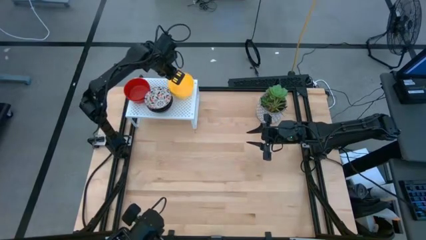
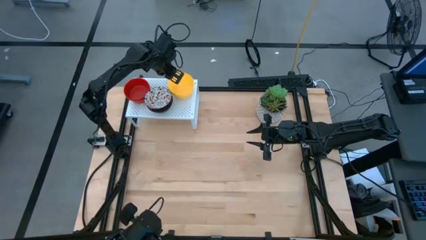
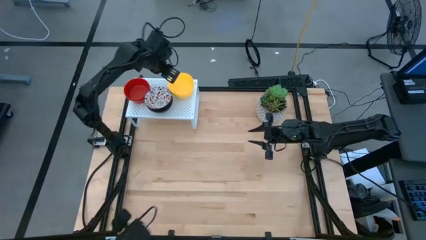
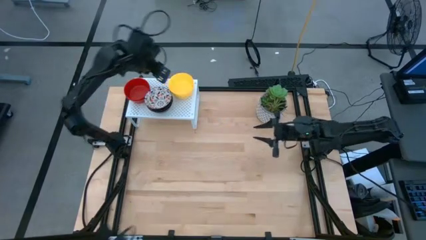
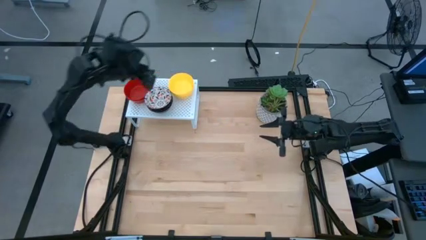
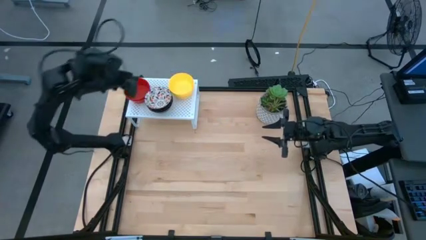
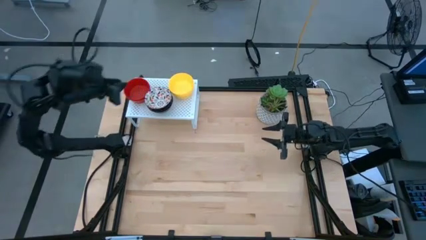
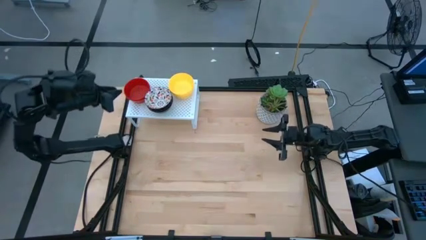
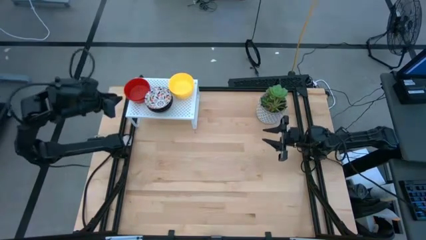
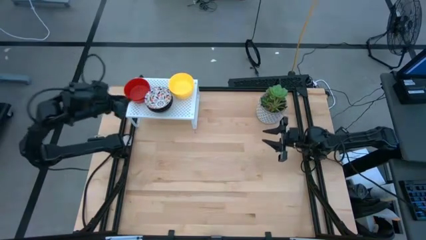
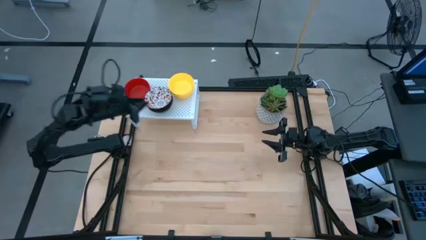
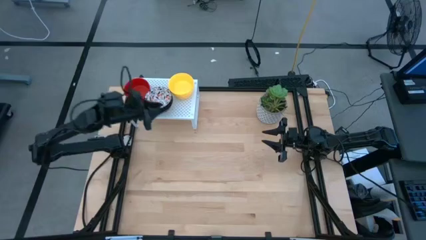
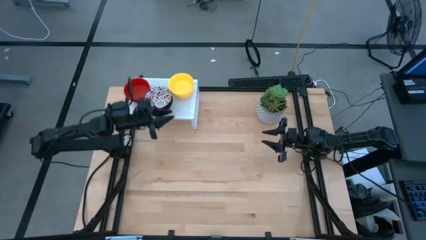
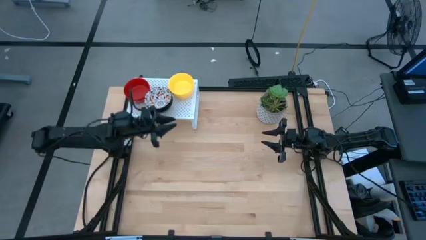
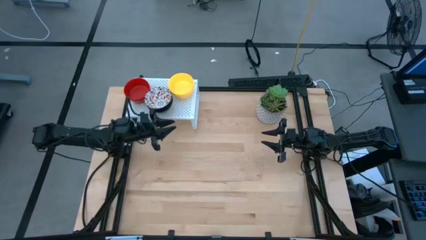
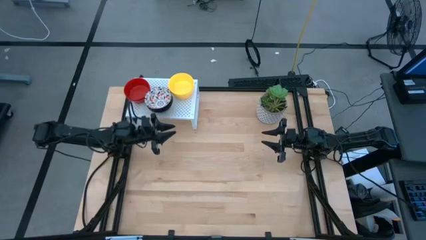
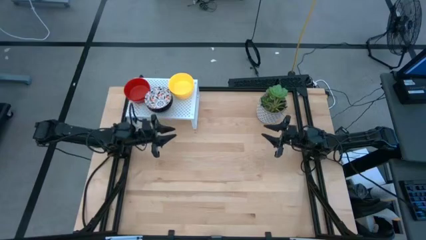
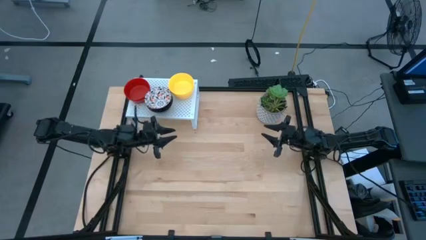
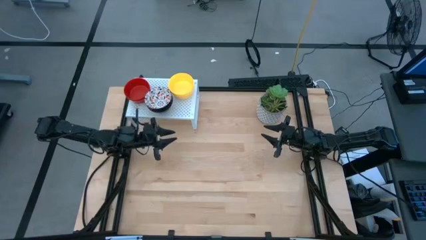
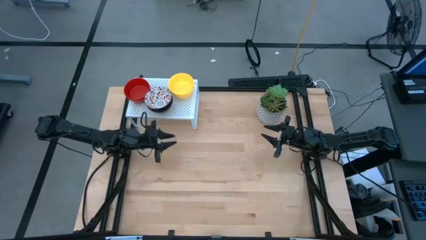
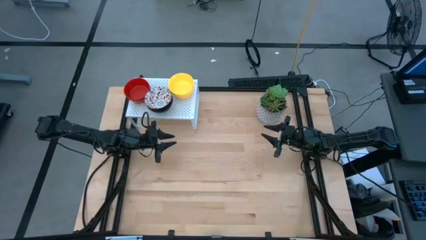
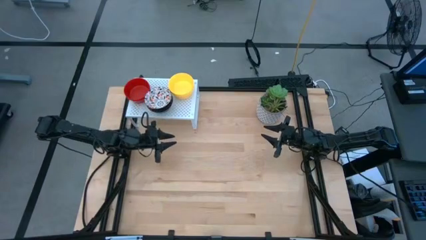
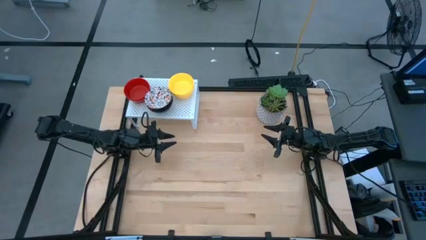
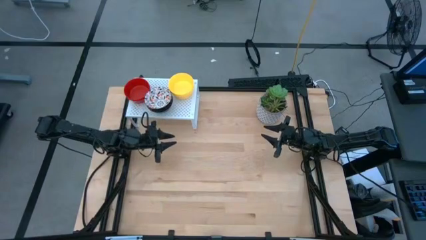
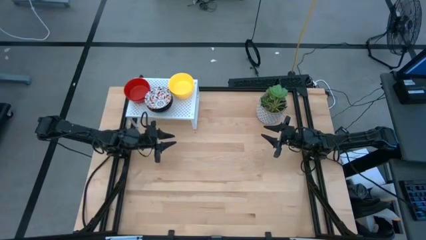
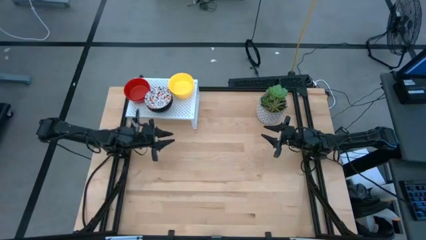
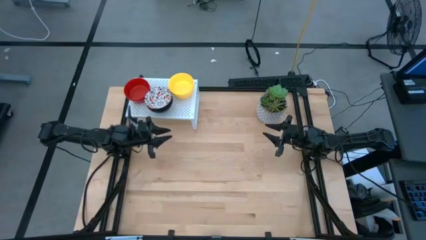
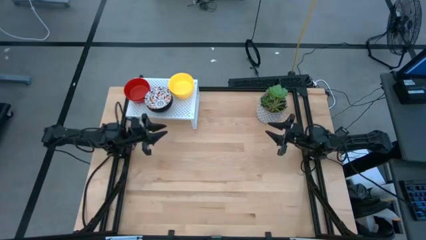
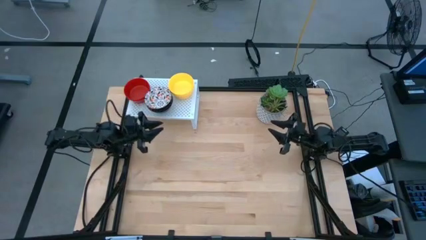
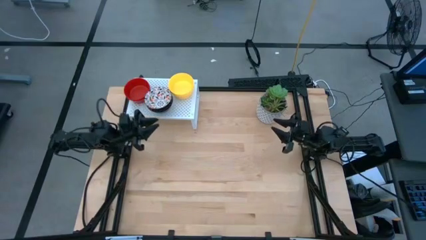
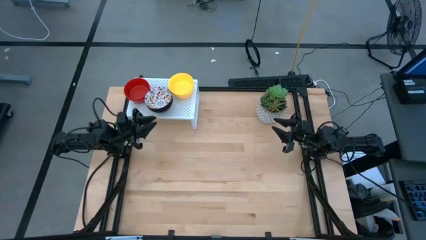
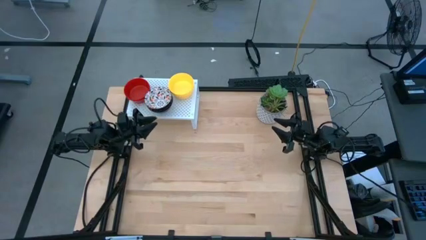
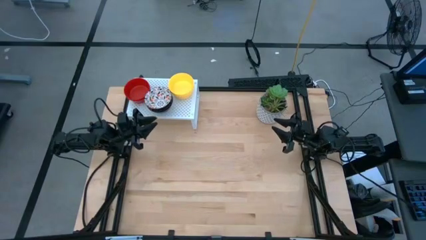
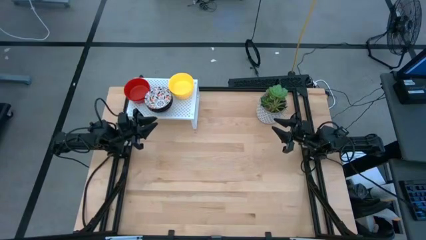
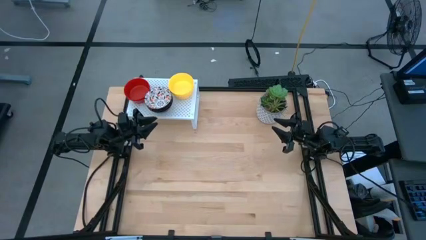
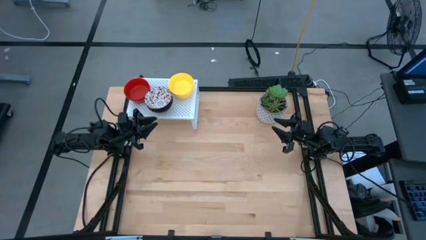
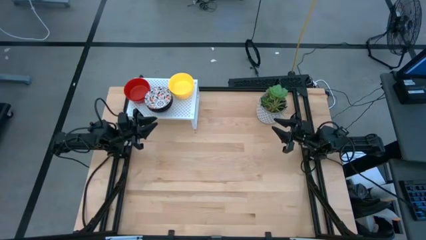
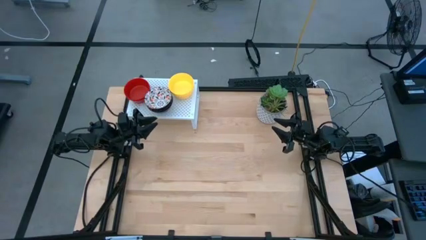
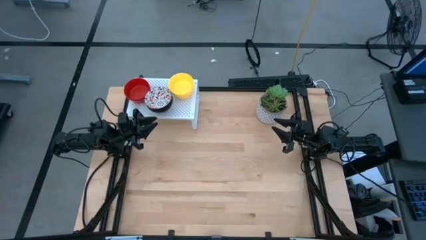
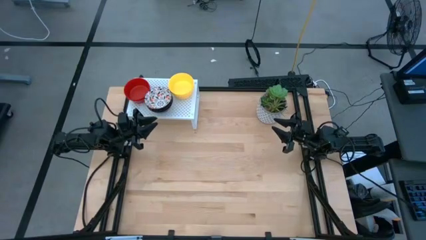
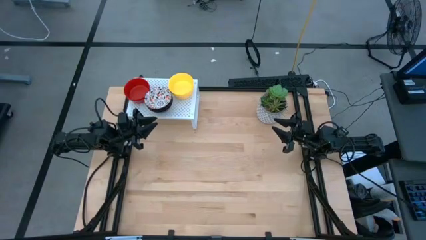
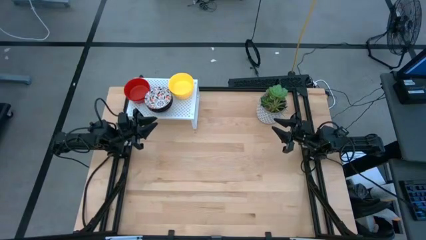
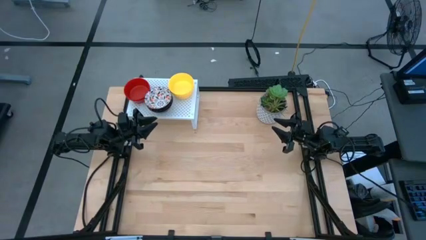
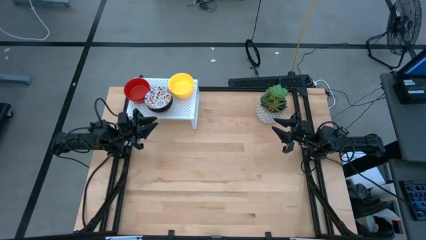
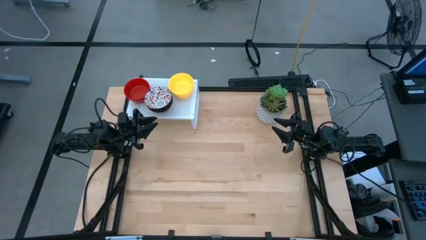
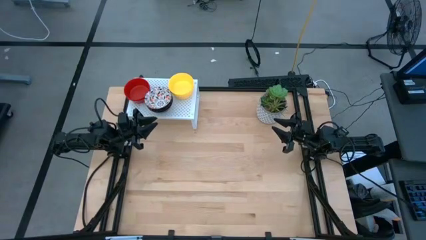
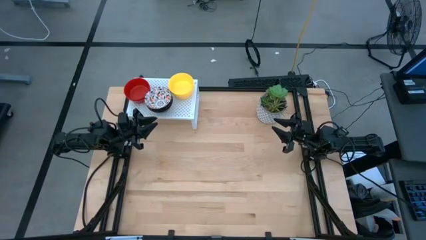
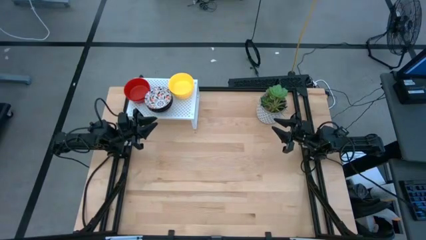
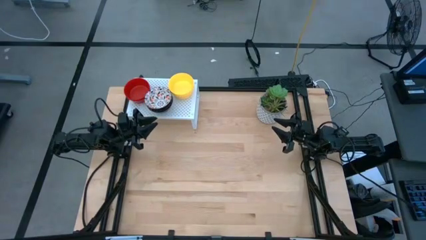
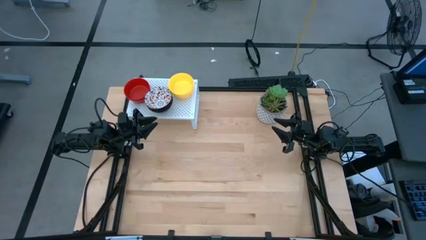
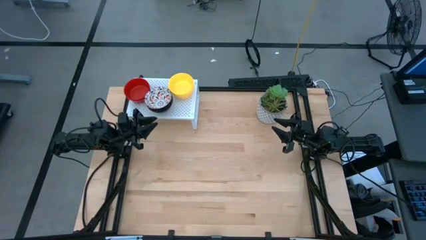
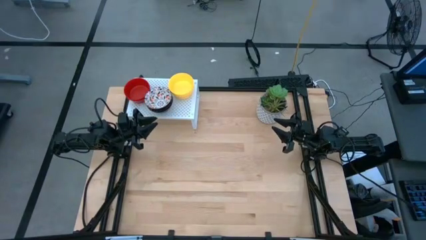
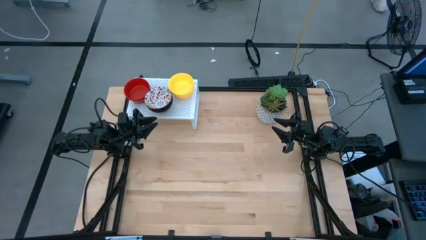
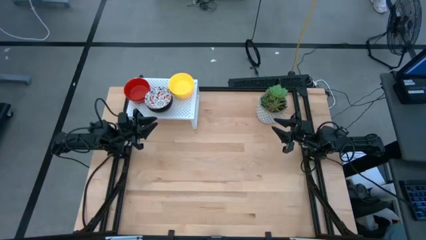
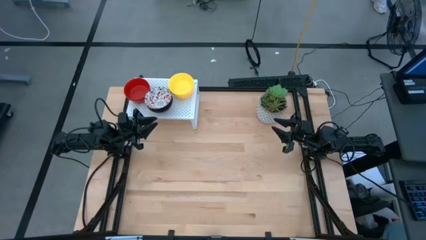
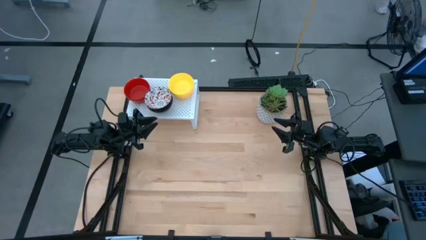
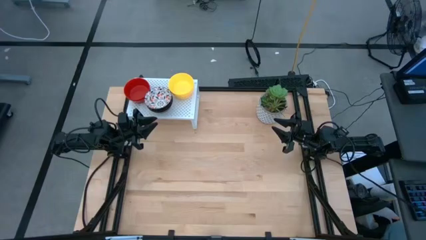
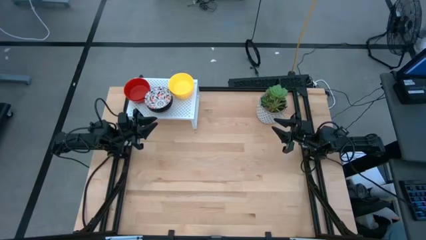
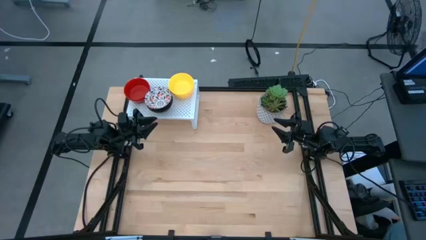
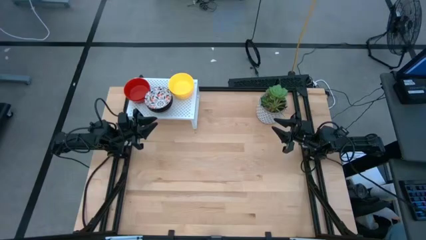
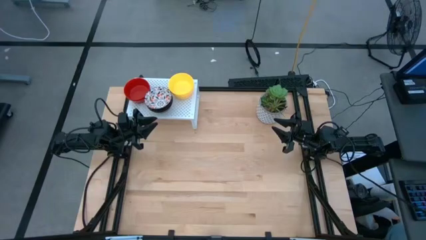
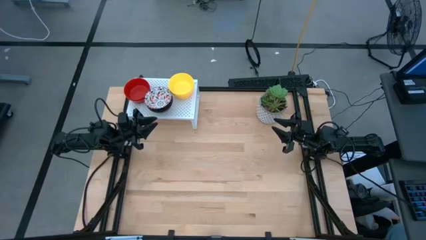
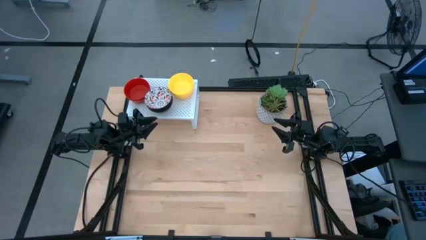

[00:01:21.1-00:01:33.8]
Task: Pick & Place Mini bowls
Return to Home Position

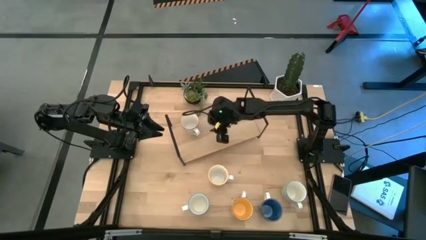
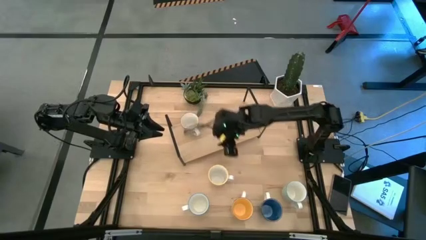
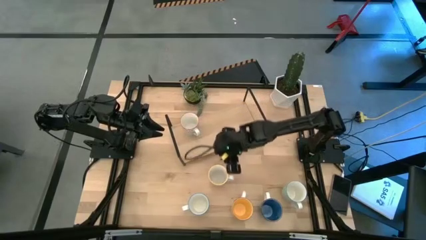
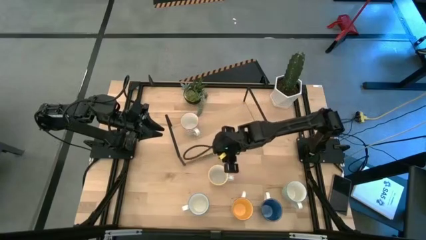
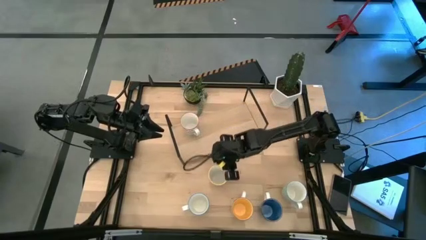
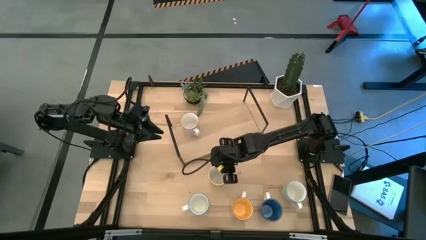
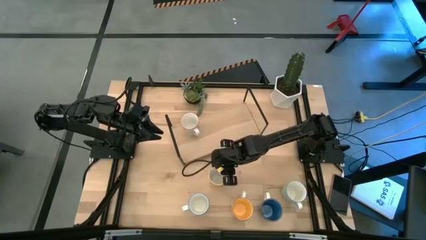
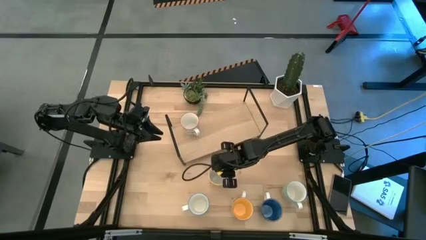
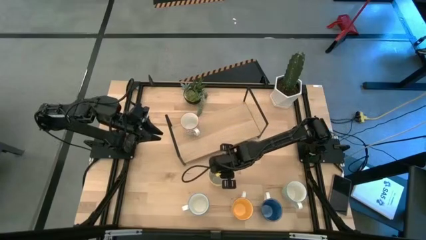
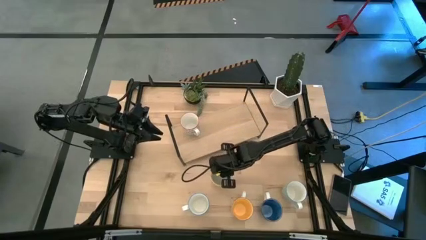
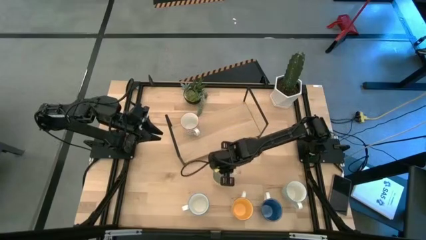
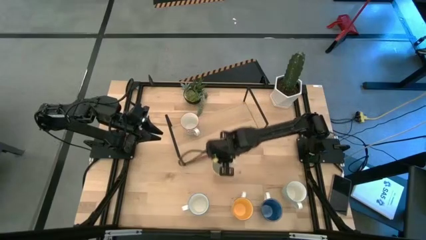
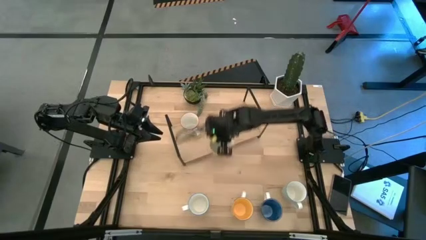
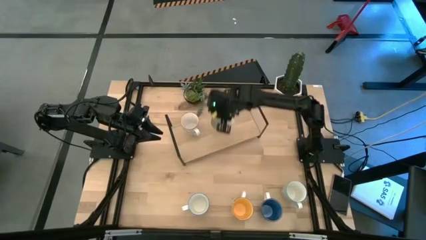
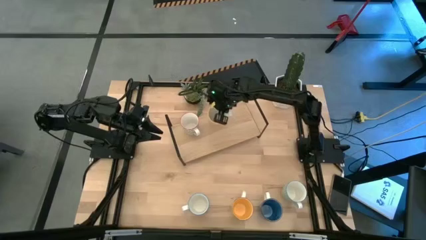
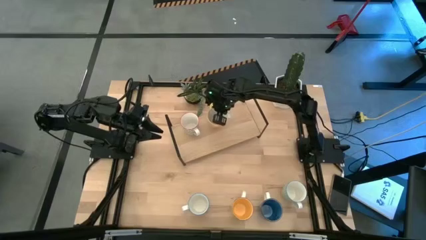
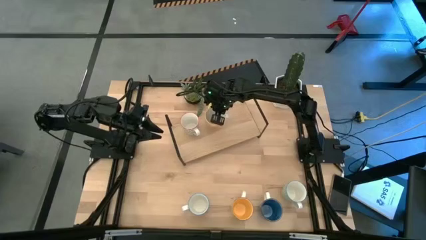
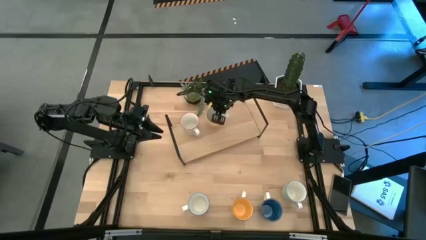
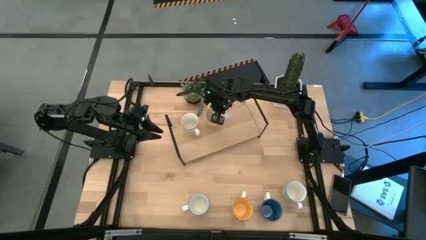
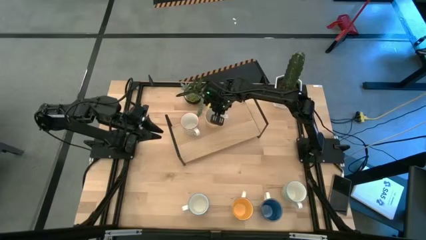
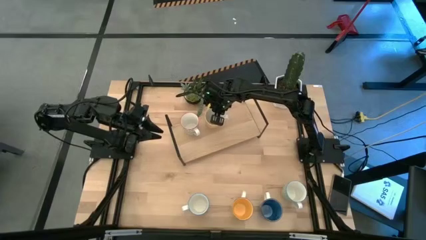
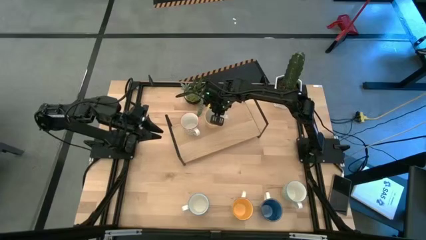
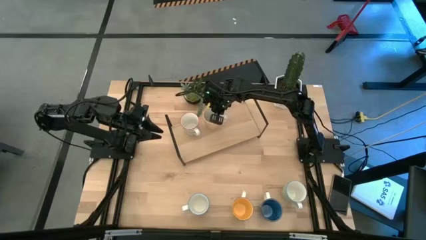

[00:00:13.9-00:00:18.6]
Task: Place coffee mugs
Put the orange patterned mug on the shelf
